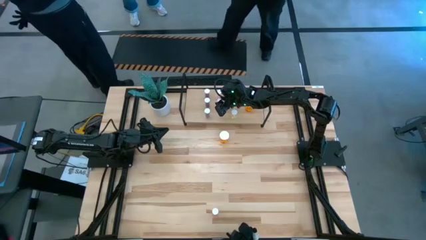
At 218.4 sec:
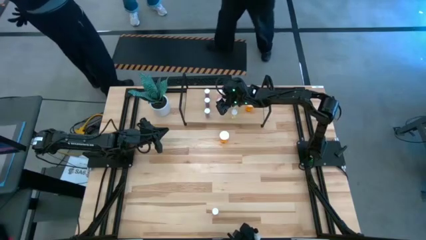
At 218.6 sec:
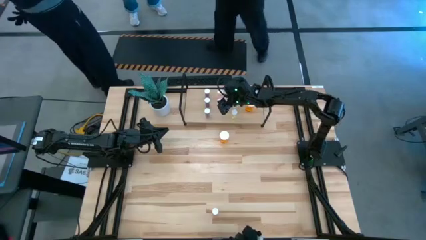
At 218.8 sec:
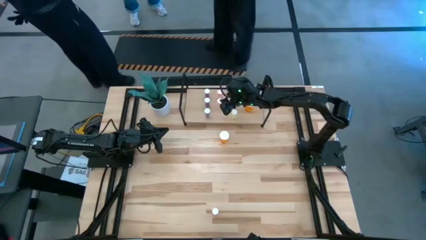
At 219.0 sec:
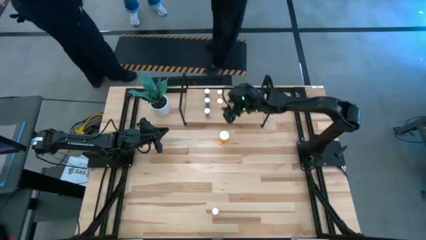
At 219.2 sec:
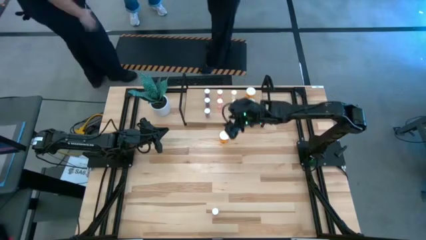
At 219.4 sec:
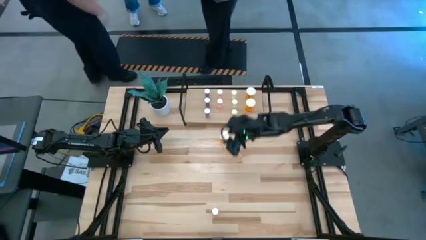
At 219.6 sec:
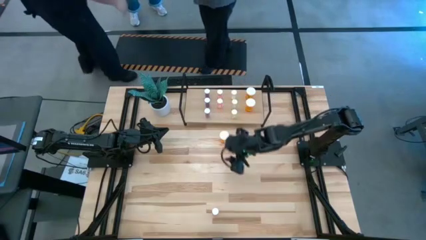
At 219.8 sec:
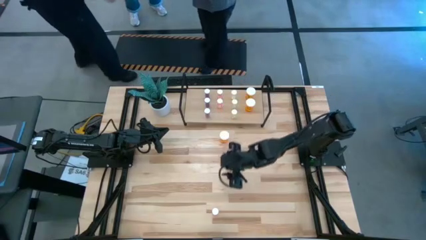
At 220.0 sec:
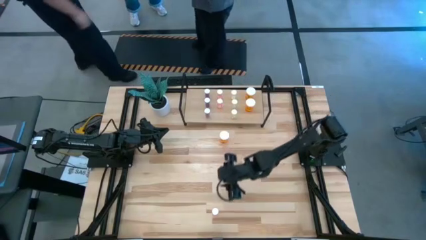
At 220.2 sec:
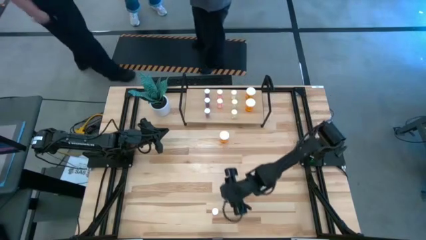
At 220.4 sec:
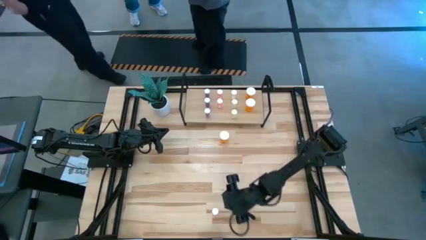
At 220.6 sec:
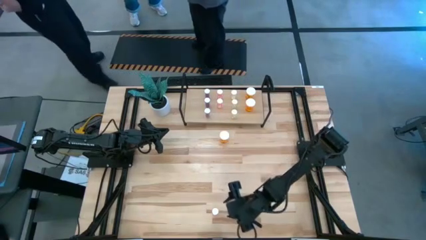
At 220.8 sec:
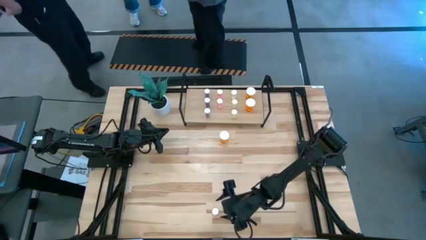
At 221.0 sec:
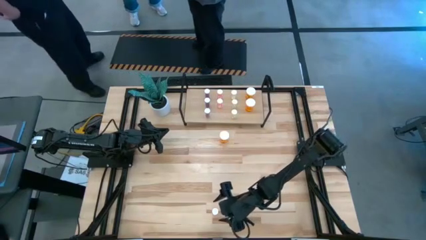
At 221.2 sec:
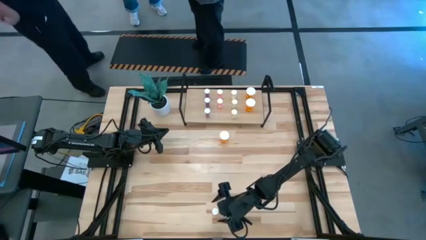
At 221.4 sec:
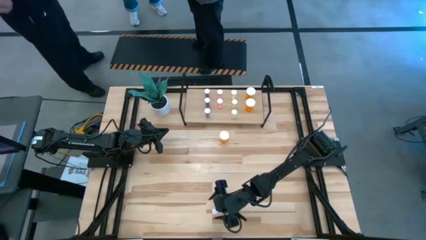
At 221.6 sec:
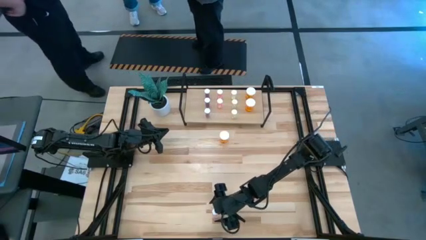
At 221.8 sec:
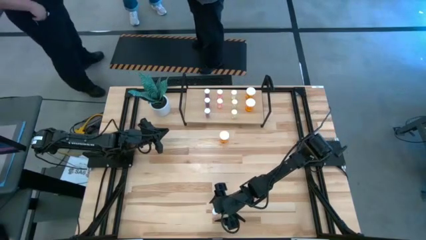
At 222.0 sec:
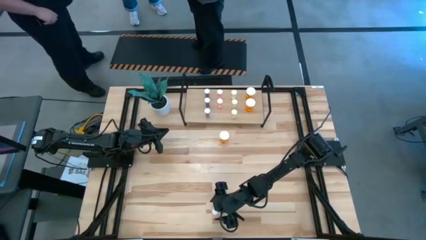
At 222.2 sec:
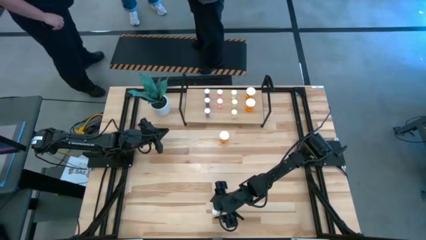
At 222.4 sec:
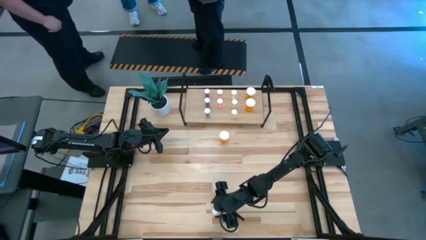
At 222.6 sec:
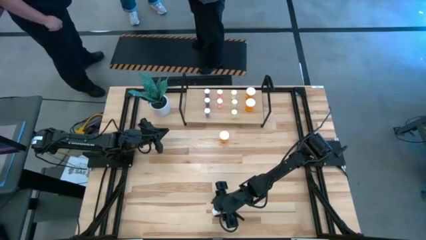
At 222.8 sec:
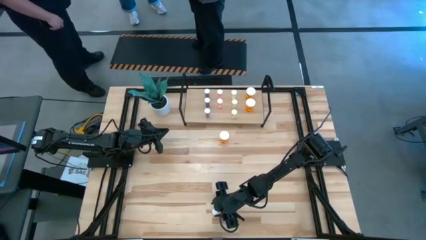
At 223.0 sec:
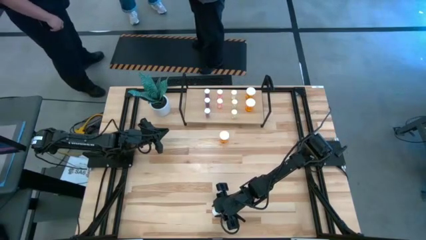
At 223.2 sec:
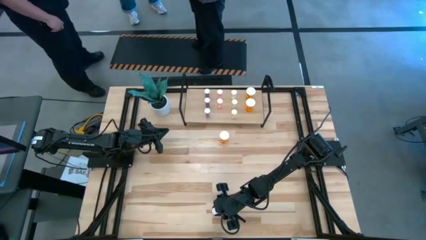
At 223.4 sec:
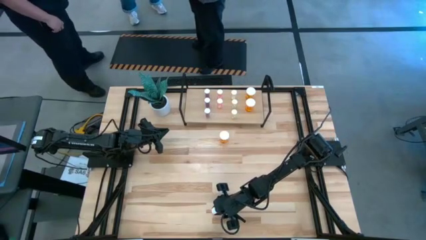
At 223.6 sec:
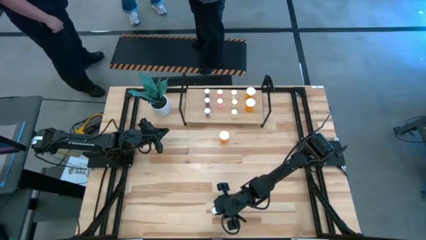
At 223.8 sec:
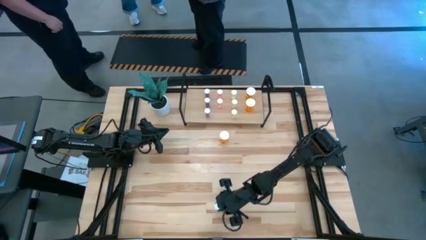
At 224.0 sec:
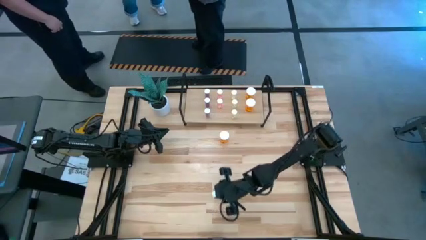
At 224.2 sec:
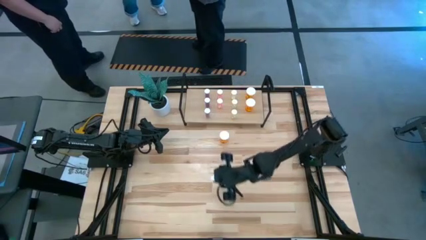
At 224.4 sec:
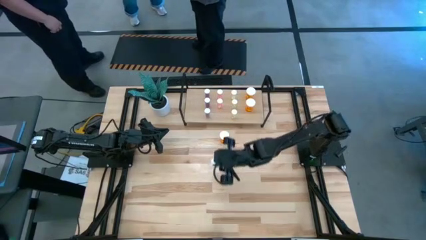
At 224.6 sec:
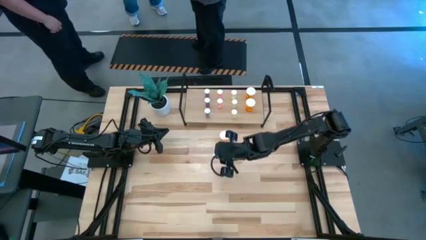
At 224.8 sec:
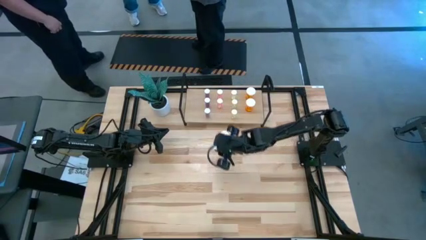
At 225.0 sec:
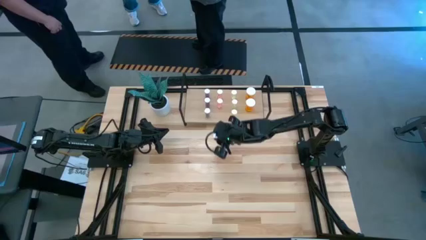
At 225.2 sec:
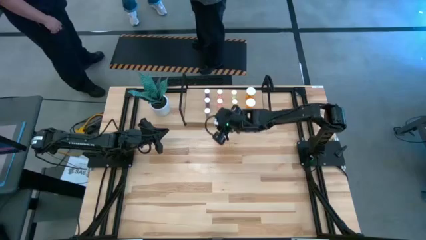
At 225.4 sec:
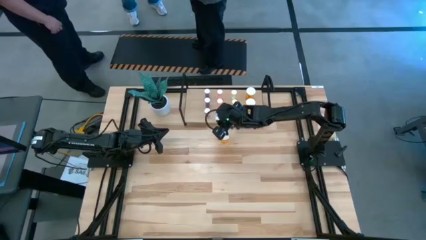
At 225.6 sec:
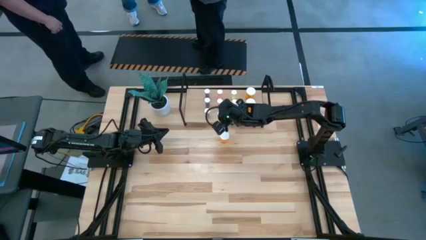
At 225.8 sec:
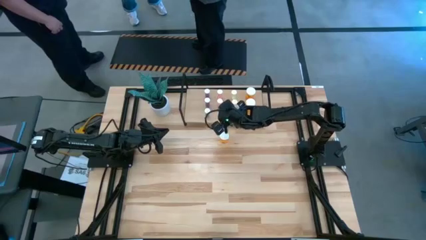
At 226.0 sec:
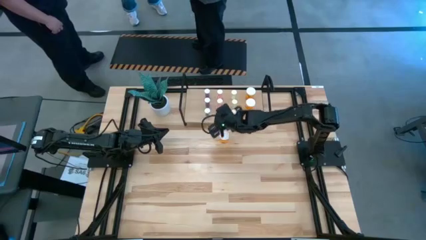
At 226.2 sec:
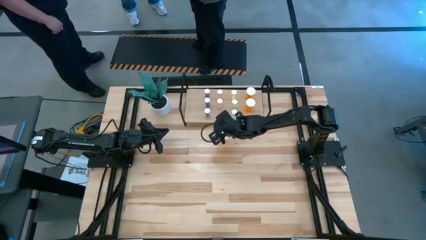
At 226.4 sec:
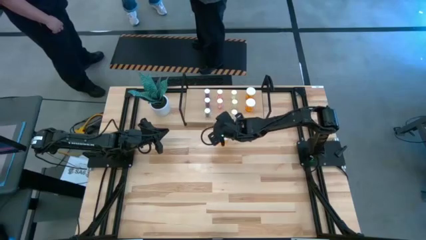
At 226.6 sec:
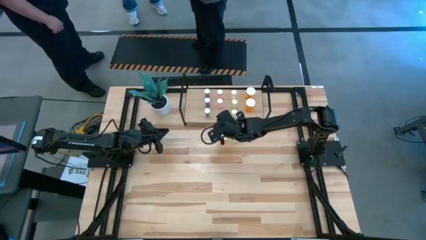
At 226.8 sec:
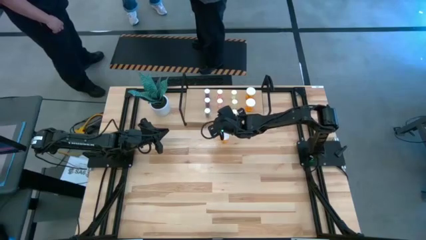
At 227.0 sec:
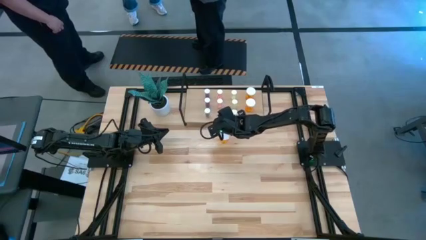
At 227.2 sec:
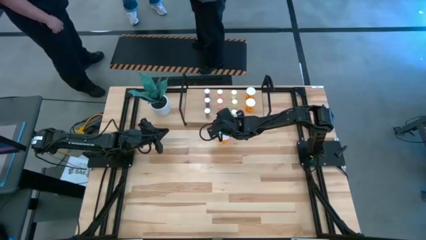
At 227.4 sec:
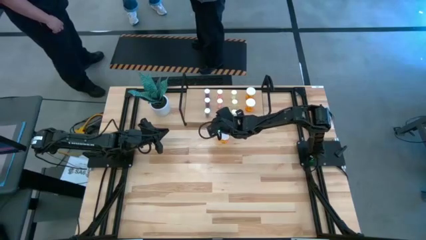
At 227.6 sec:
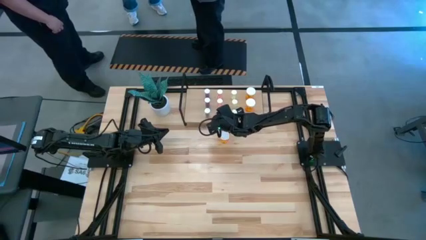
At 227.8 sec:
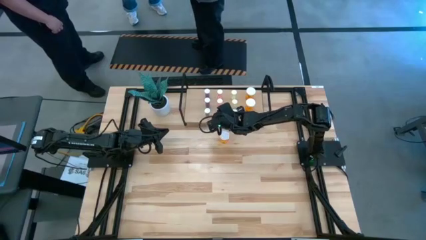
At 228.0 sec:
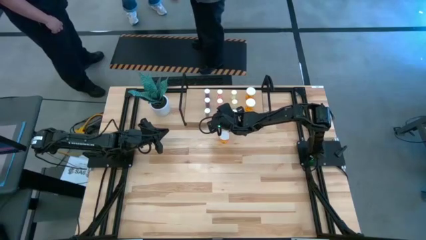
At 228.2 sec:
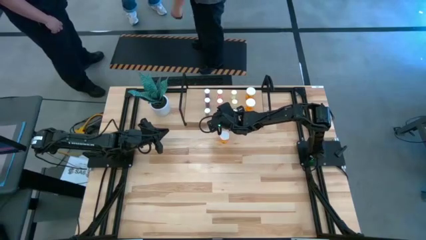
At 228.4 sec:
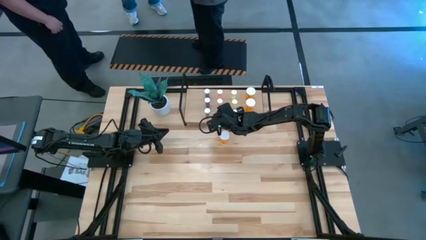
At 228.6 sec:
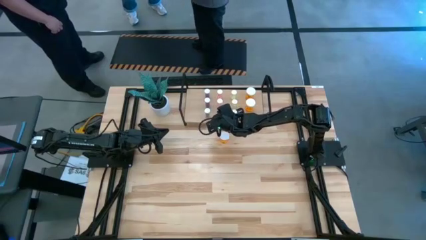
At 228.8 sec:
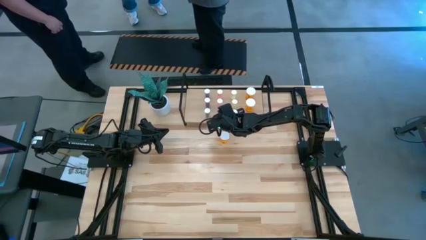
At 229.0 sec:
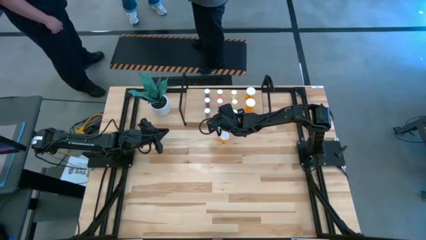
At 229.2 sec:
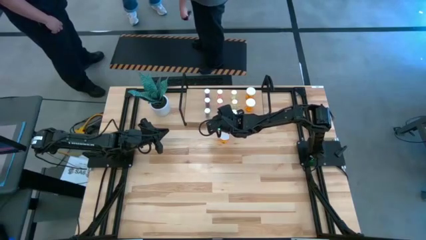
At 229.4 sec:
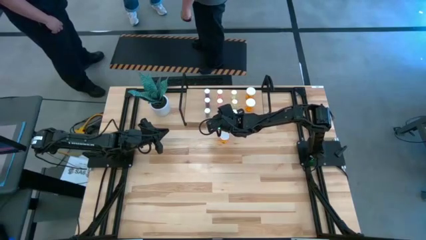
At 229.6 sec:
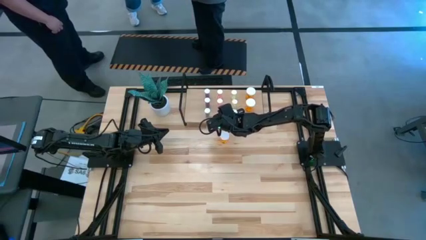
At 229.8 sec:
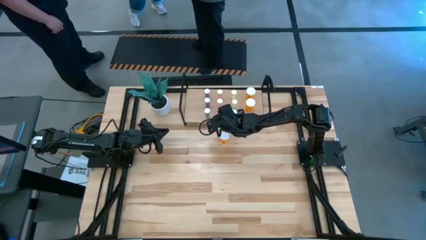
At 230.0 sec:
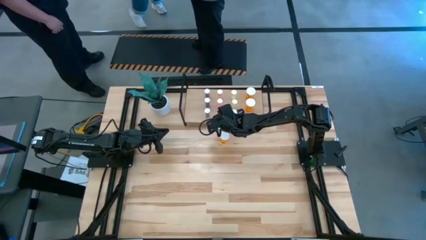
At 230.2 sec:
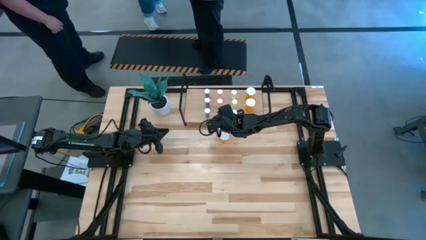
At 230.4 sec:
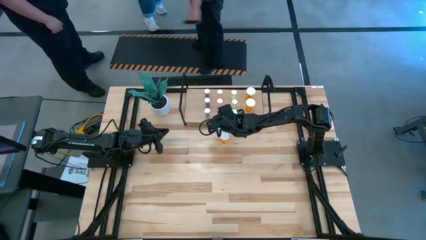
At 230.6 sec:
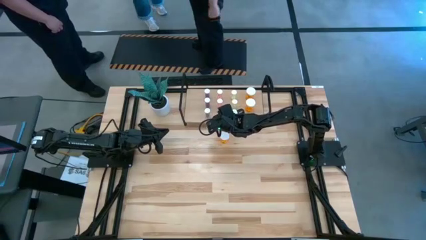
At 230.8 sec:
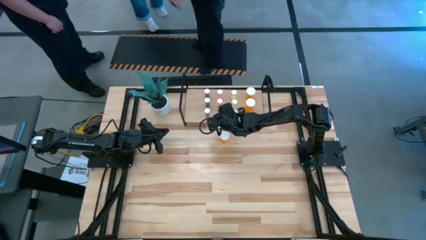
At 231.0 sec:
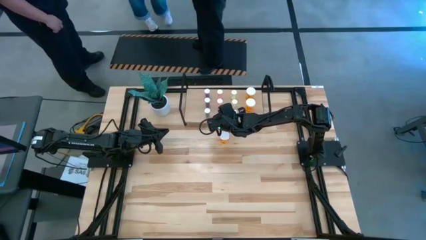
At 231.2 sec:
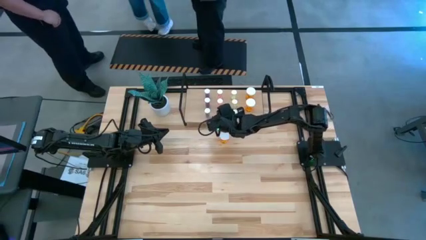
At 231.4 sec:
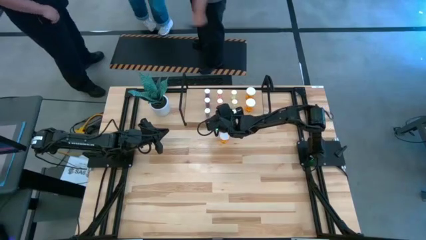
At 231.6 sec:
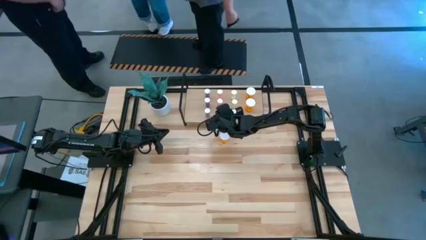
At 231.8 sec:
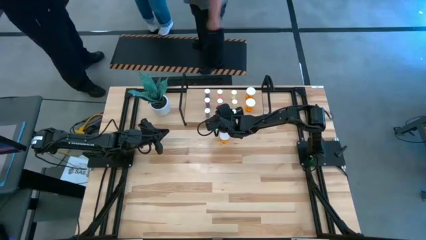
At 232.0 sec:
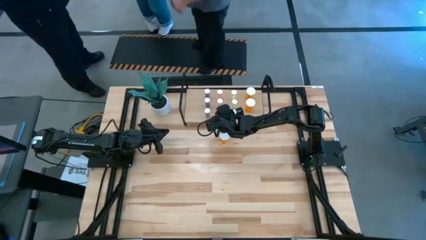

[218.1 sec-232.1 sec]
Task: Pick and place medicine bottles onto shelf by color
Put the red pill bottle on the shelf

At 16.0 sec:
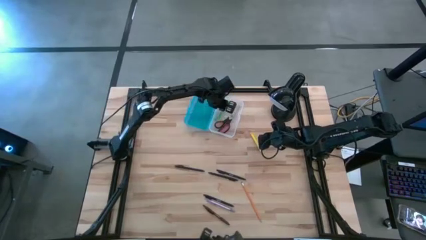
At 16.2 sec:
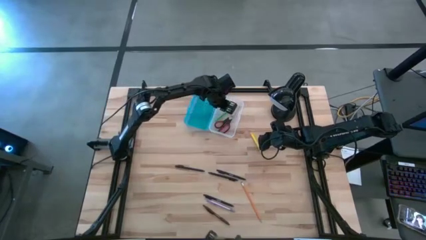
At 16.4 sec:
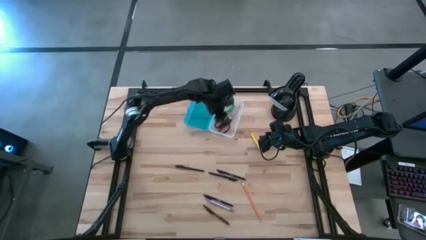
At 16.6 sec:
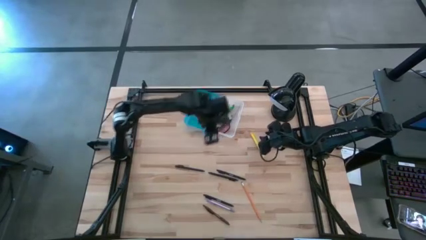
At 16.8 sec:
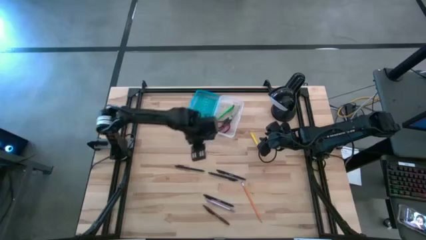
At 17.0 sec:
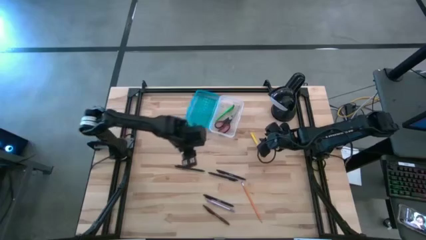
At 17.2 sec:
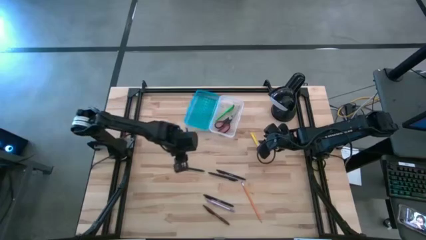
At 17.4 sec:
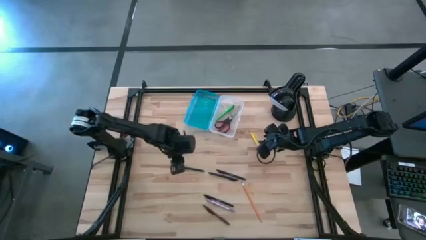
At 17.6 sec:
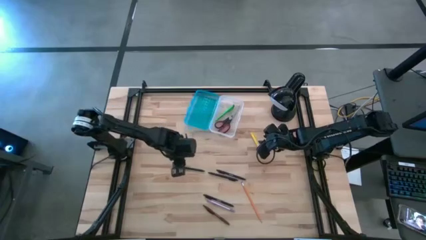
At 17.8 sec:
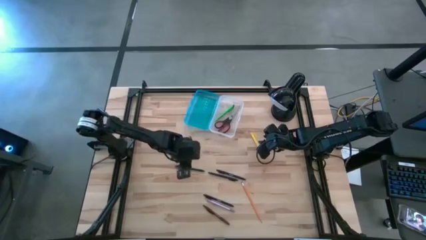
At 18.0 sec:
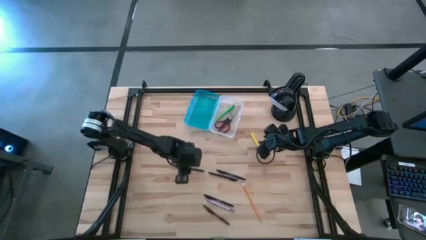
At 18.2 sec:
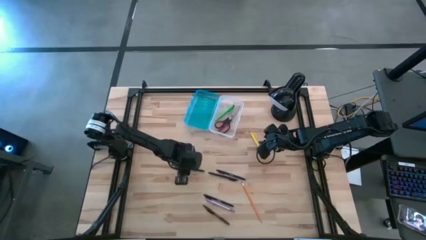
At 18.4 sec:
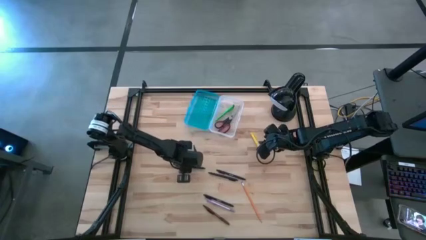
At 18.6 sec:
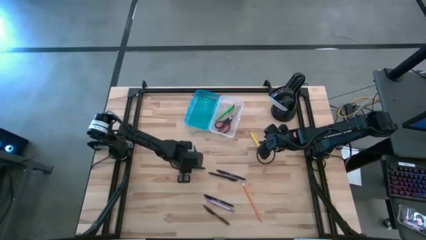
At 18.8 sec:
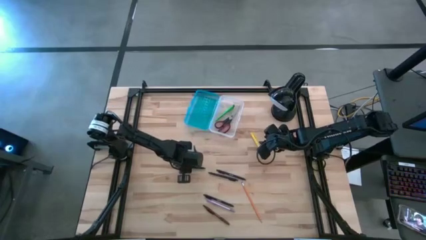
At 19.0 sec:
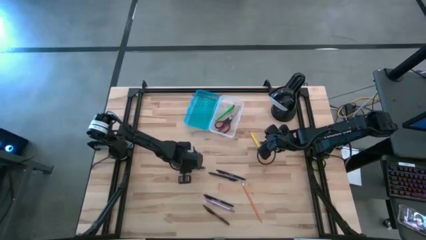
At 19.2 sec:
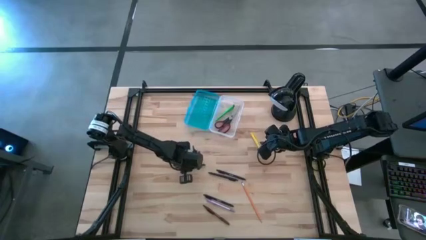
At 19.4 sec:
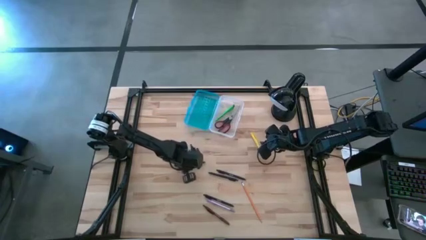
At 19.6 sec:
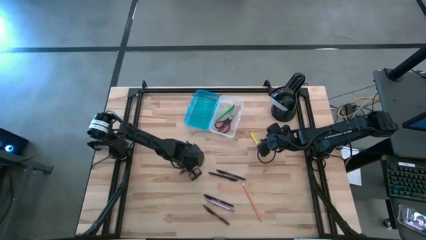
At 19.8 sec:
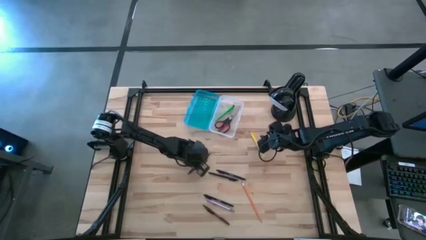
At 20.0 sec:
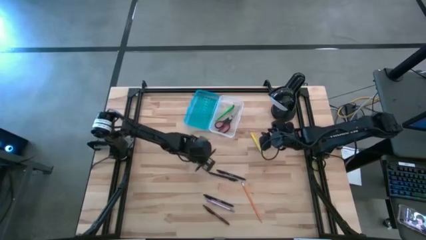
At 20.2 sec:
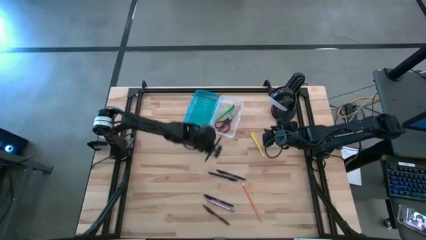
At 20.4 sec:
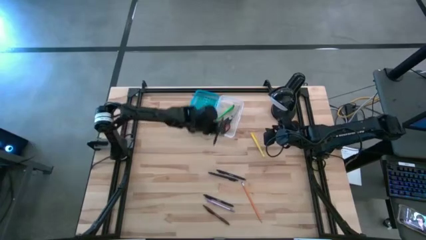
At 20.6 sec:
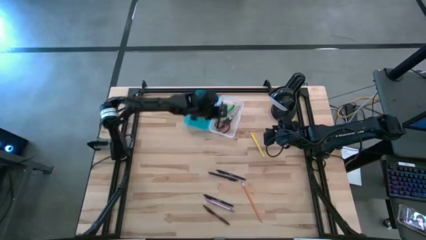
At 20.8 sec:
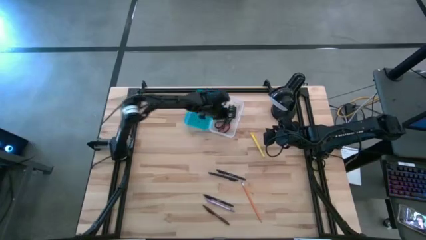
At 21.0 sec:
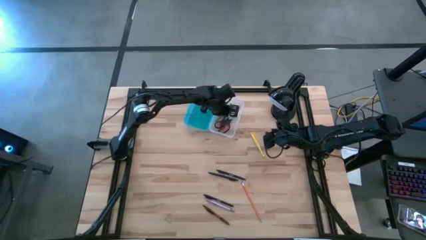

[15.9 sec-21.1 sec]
Task: Pick & place school supplies into a supply box
Put the black pen into the blue supply box
